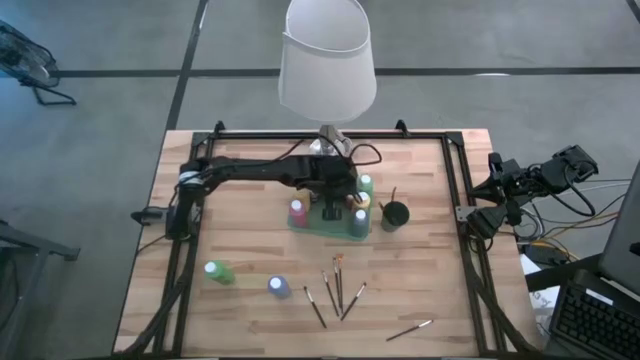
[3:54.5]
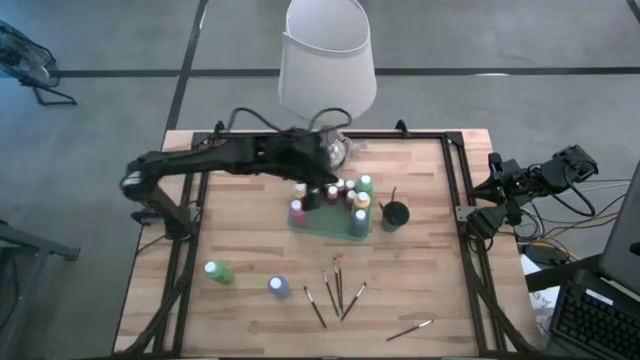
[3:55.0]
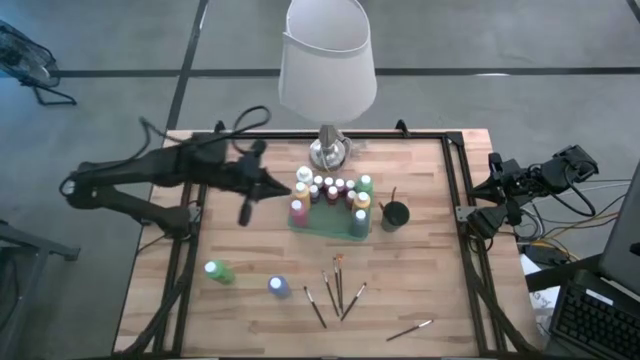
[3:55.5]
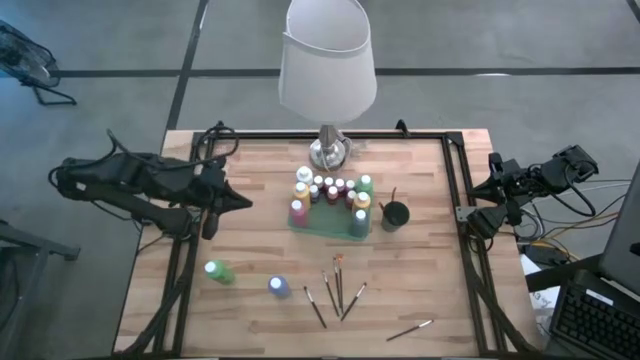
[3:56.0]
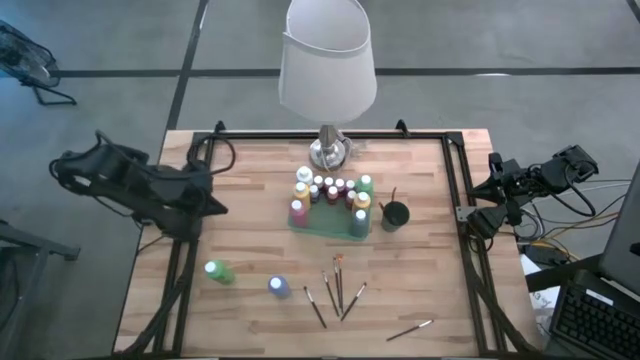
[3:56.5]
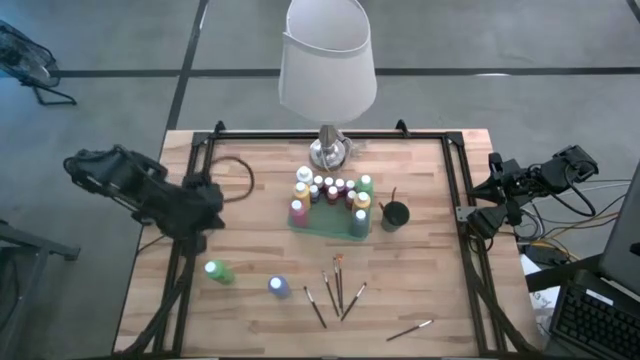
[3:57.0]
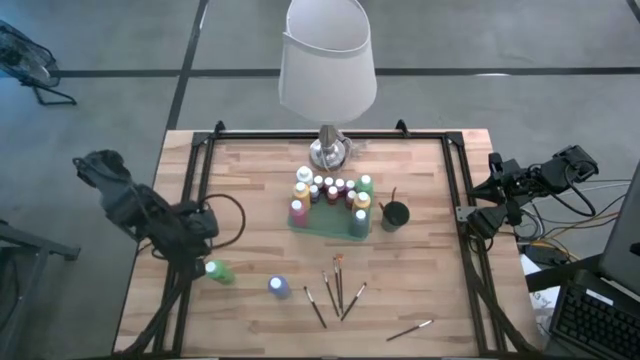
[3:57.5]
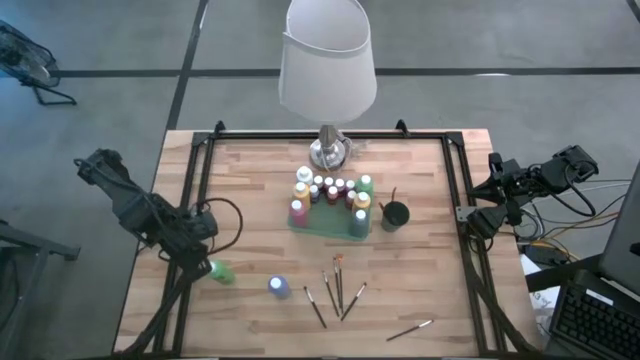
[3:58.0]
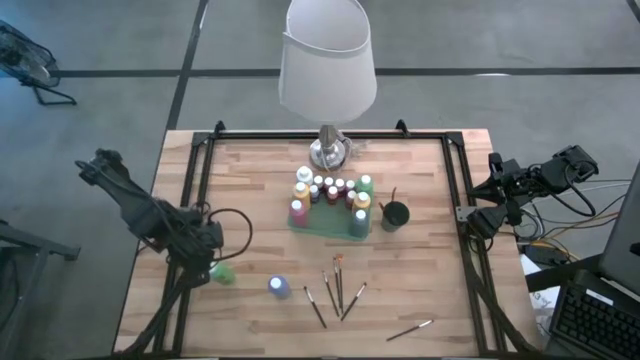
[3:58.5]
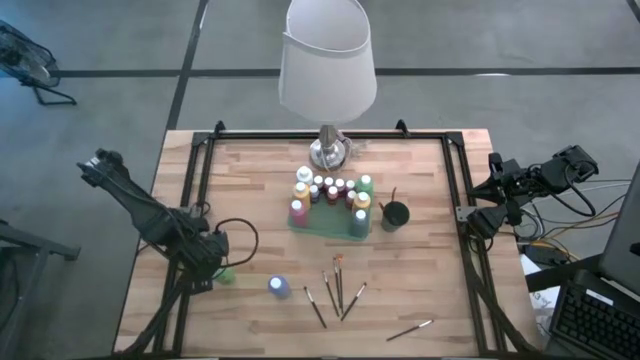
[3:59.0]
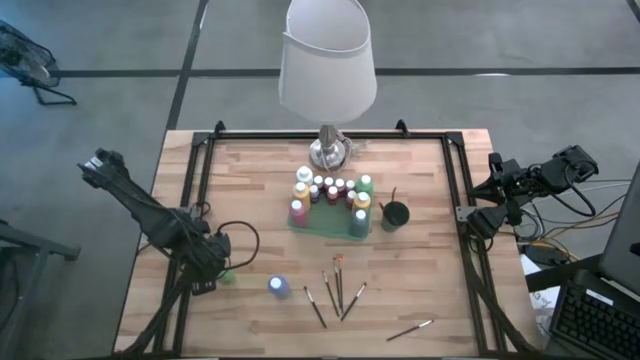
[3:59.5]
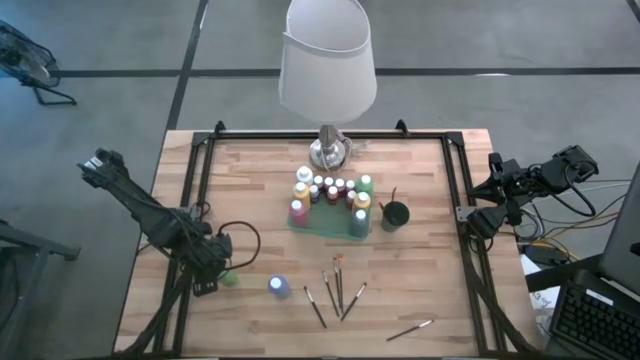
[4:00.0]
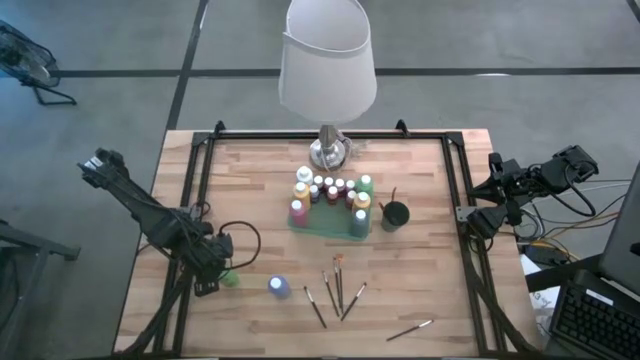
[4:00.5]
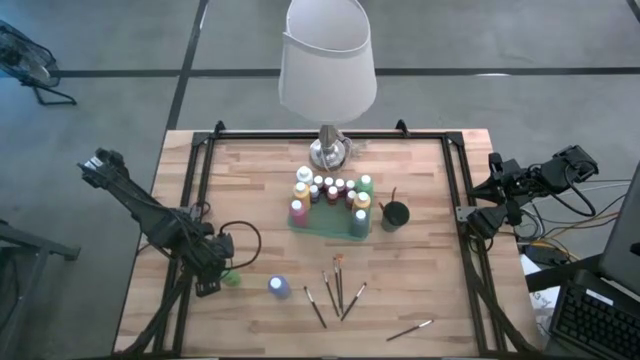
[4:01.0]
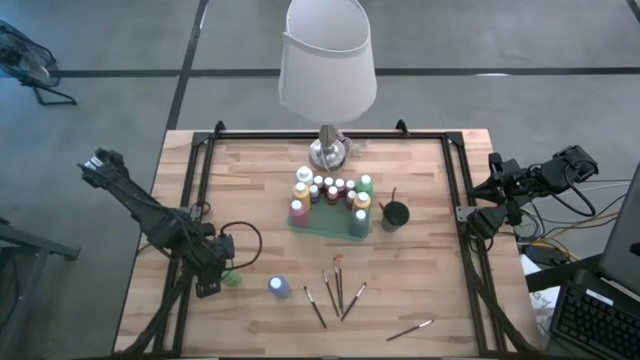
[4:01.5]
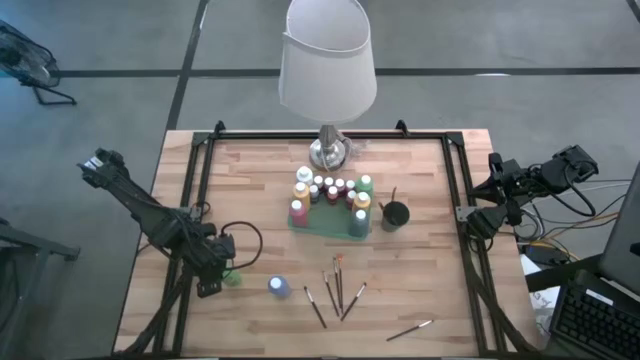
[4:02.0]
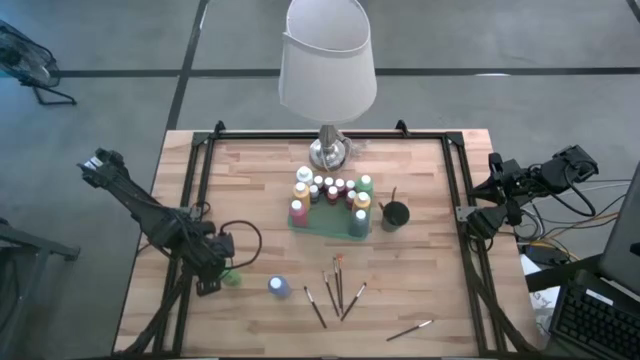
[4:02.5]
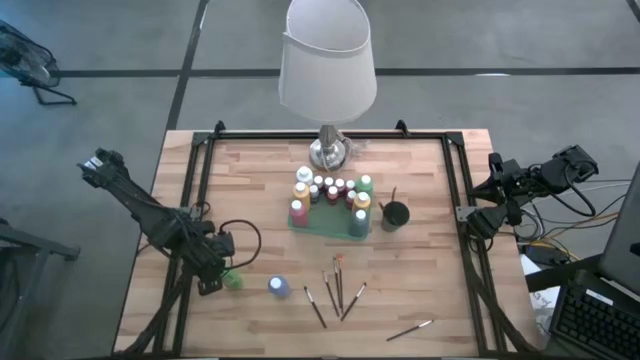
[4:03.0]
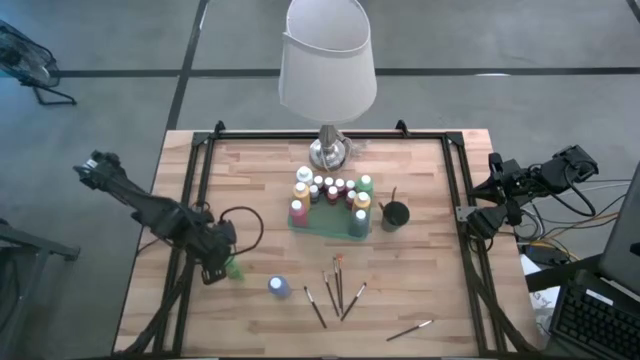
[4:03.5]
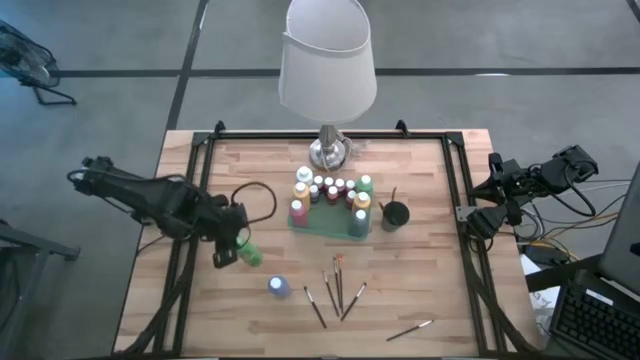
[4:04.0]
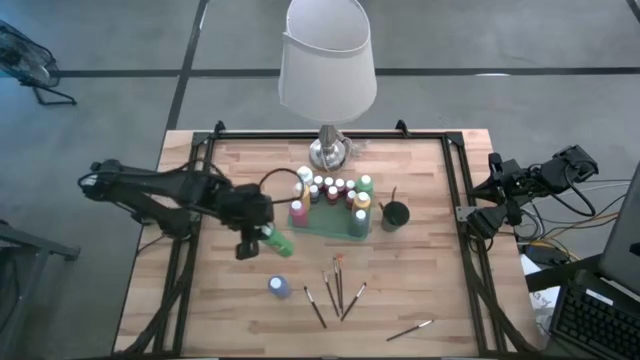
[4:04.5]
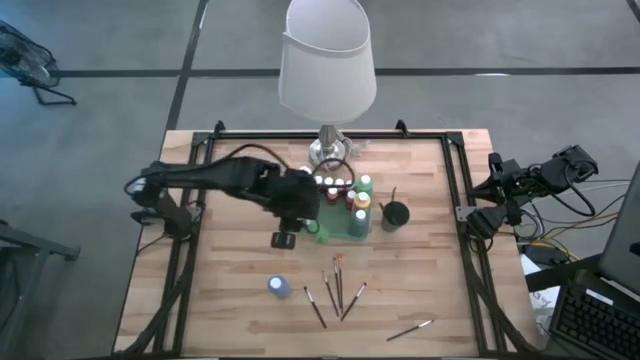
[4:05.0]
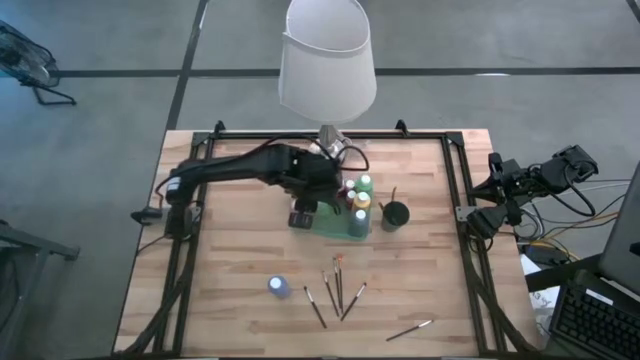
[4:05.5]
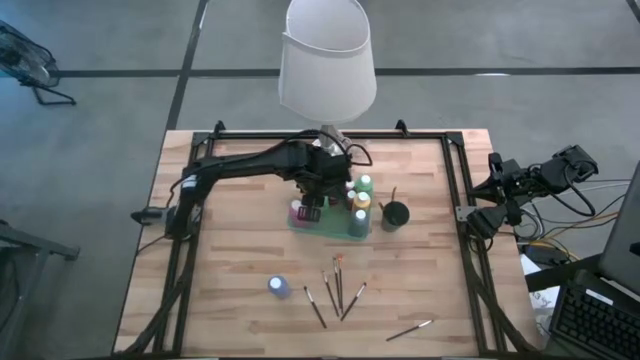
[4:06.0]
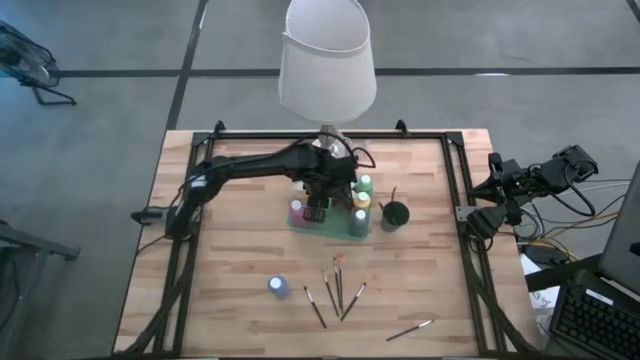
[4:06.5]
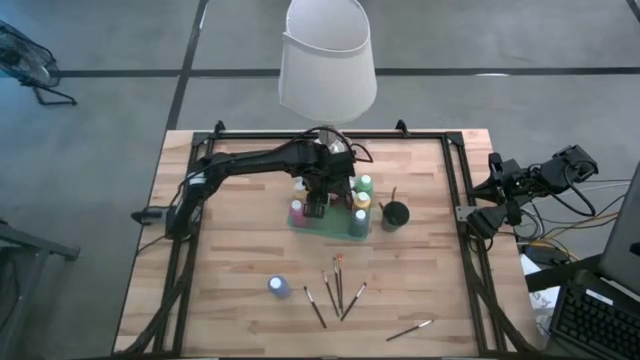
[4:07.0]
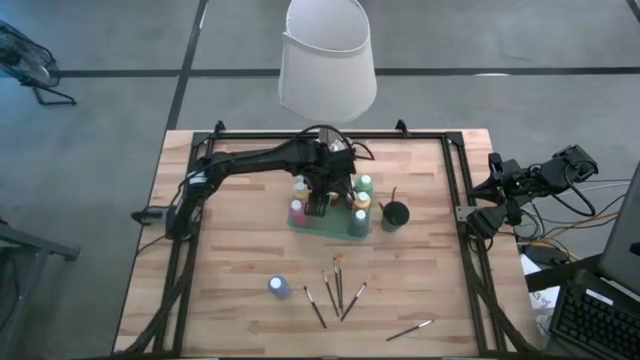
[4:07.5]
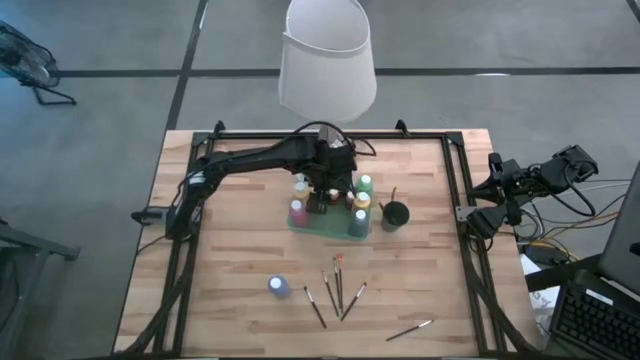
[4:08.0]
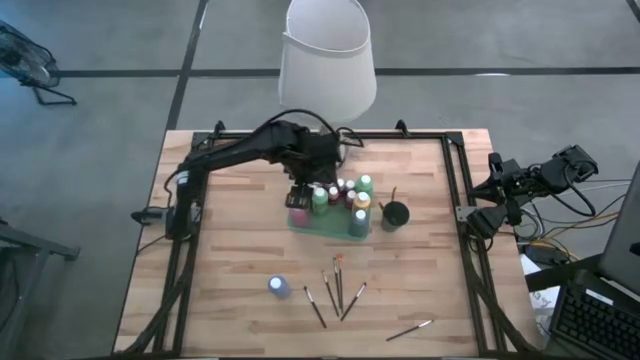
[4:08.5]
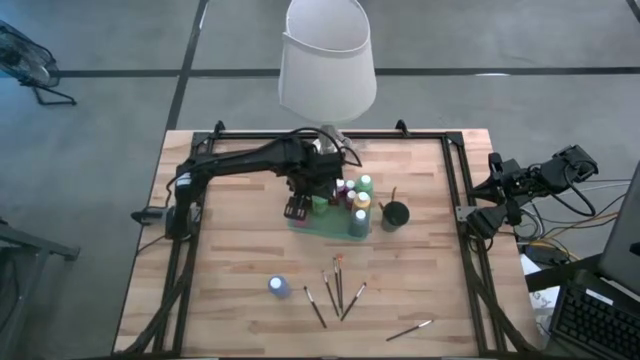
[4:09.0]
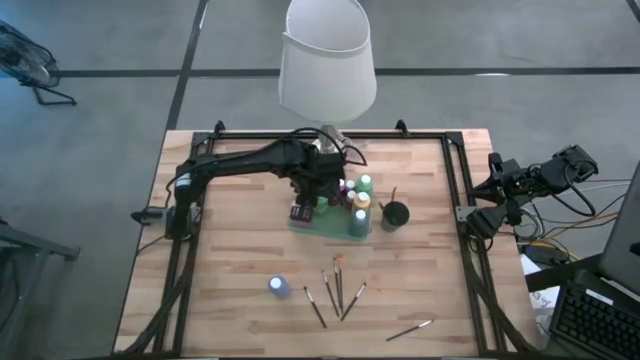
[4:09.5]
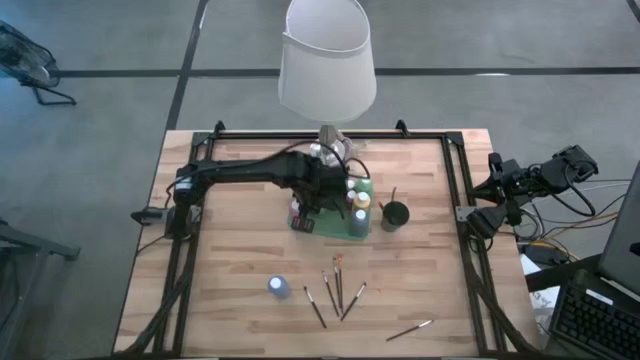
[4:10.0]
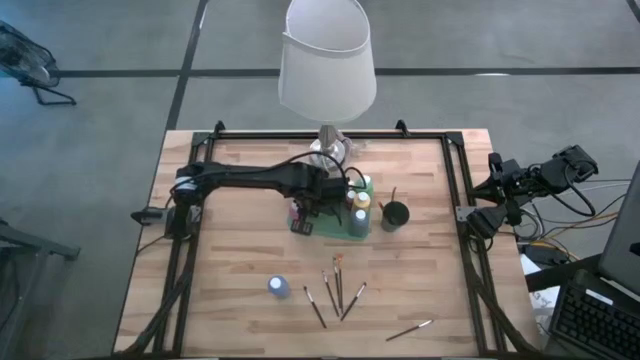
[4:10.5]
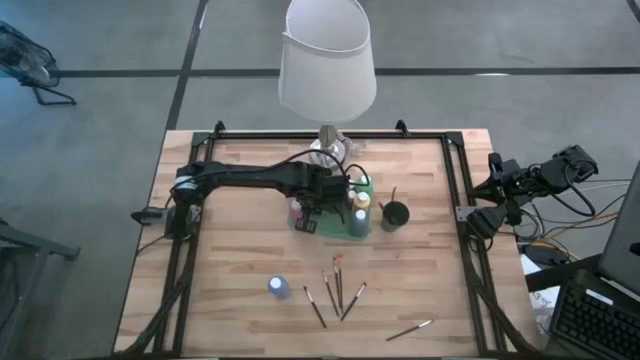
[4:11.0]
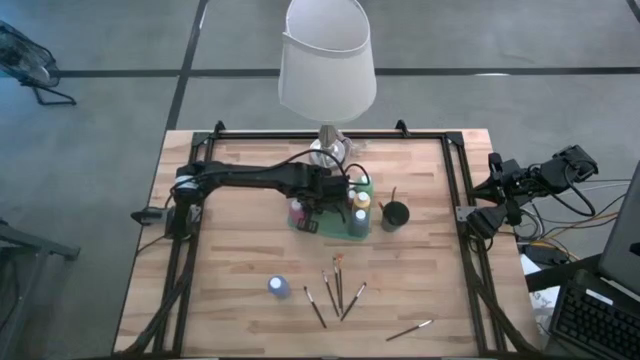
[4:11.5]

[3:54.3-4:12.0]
Task: Pick & Place Paint Supplies
Put the green paint bottle into the green bin

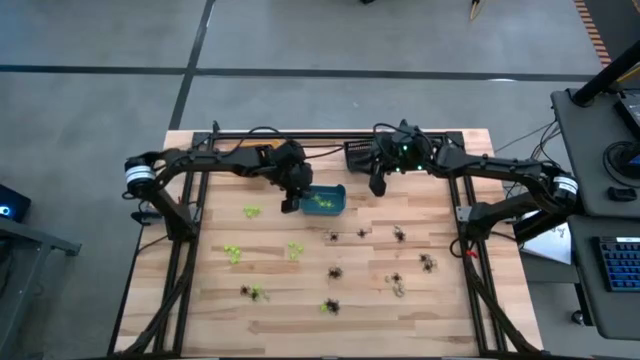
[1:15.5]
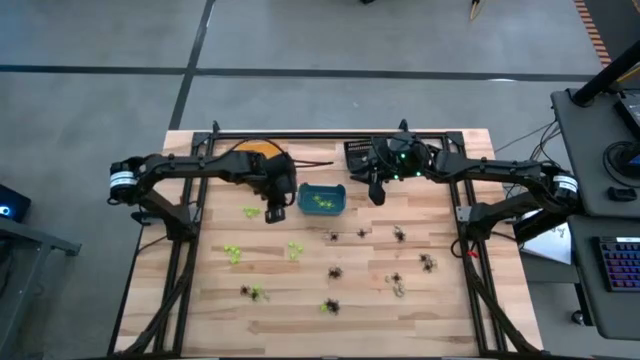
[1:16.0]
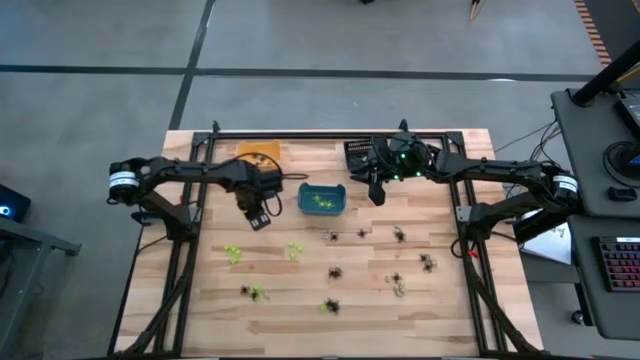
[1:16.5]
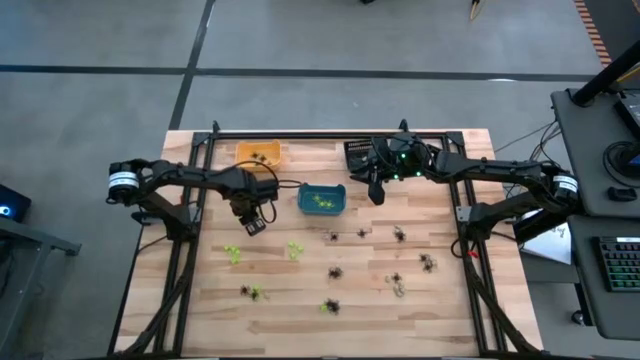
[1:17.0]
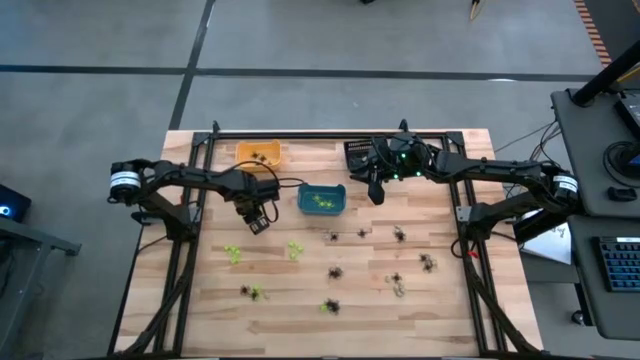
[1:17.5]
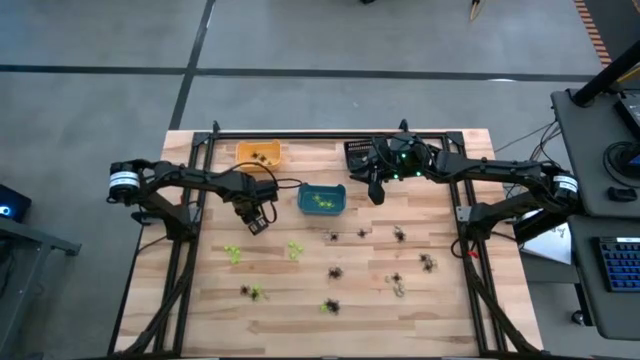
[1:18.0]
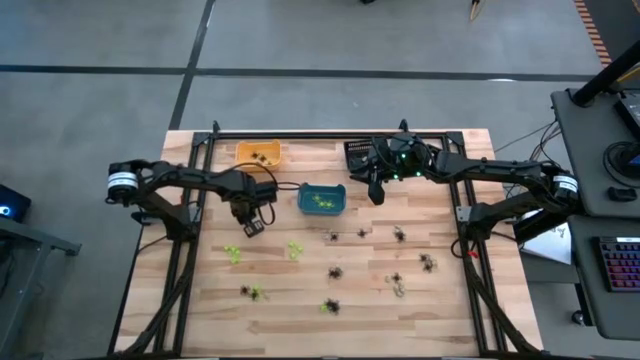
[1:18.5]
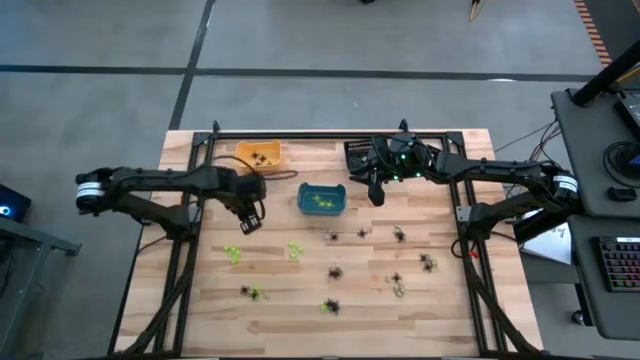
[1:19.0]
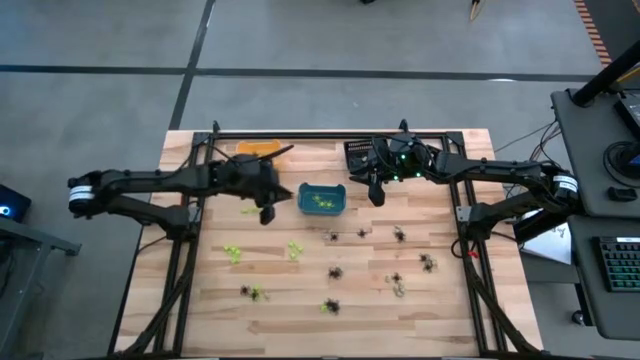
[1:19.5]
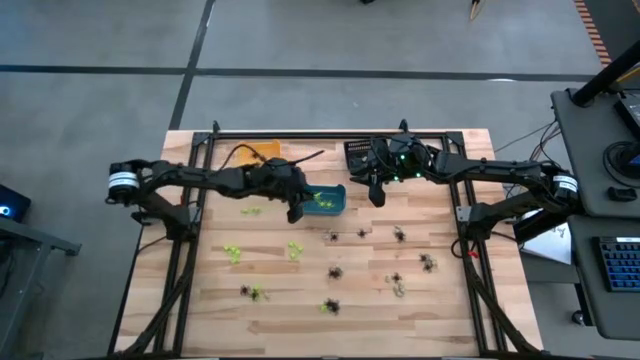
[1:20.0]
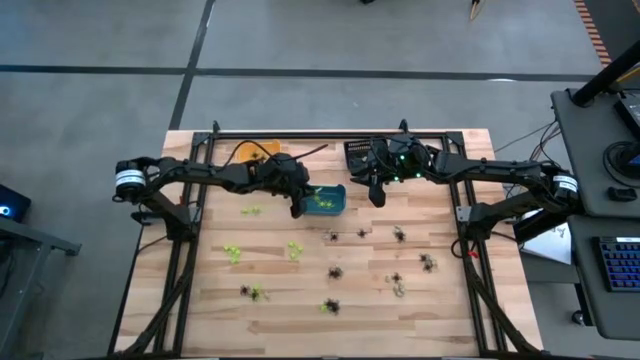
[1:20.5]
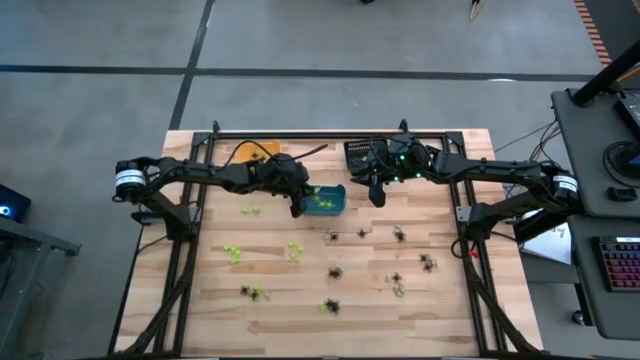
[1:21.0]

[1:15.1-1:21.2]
Task: Sort Halloween decoration
Put the green spider toy into the blue bin
